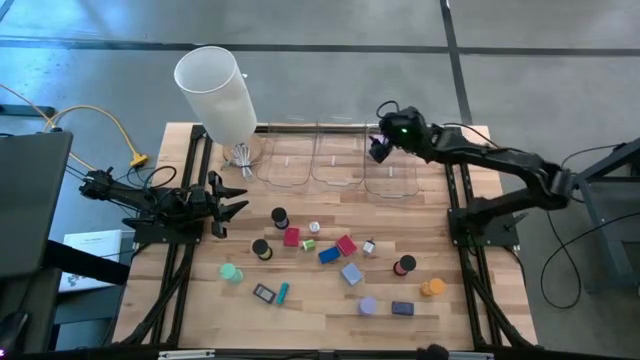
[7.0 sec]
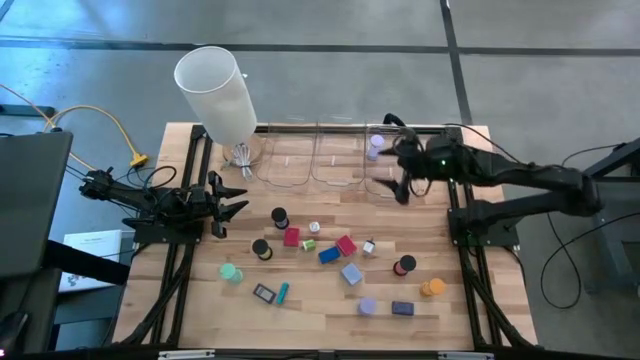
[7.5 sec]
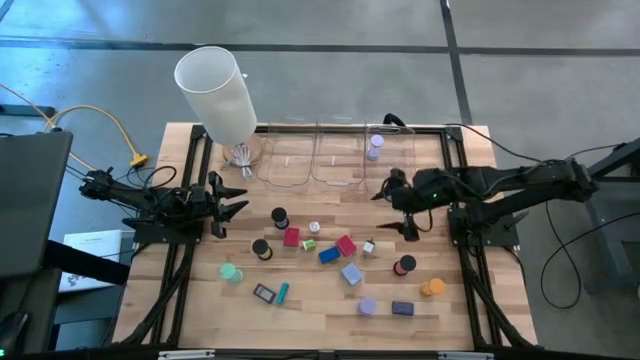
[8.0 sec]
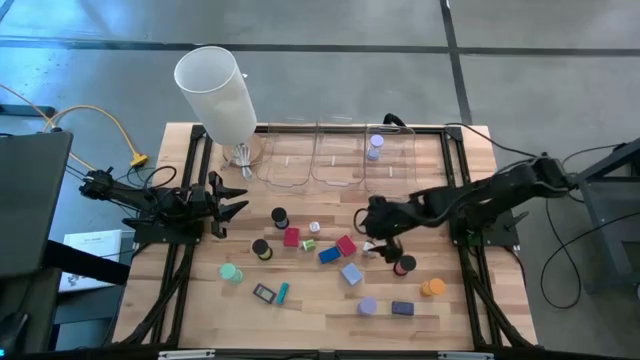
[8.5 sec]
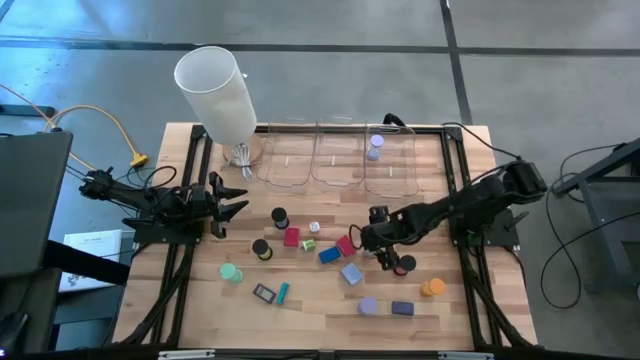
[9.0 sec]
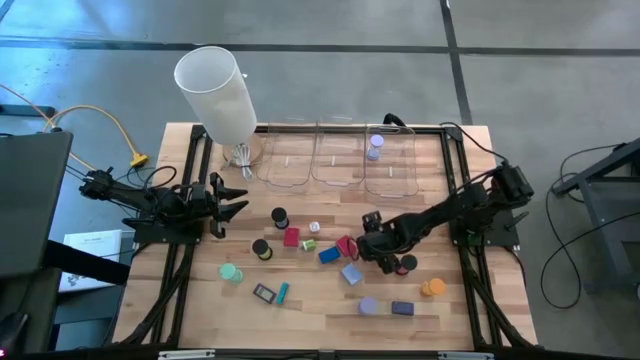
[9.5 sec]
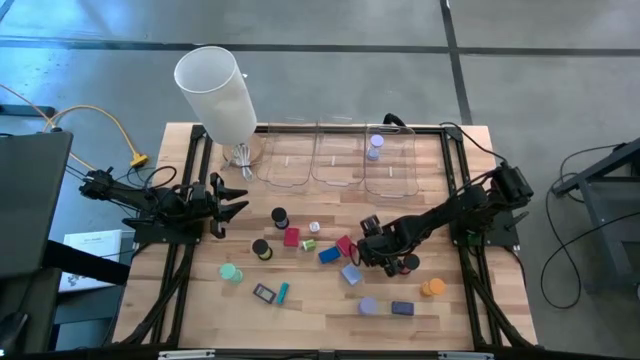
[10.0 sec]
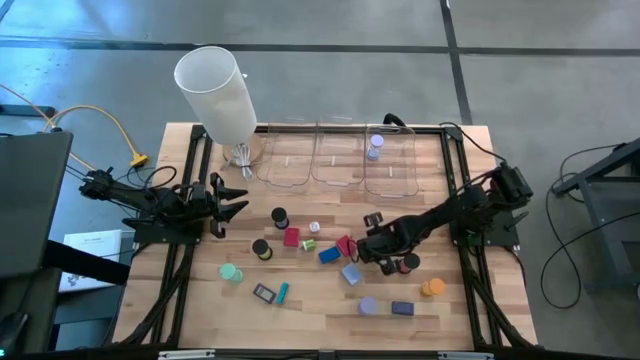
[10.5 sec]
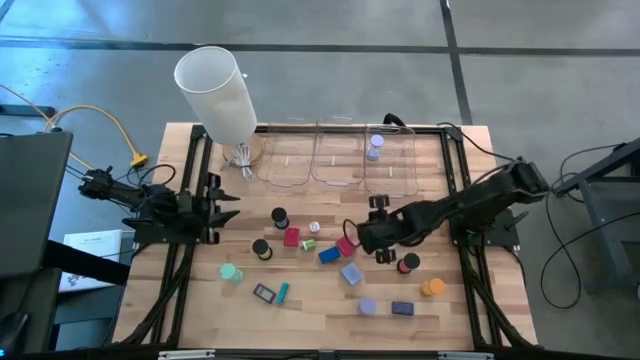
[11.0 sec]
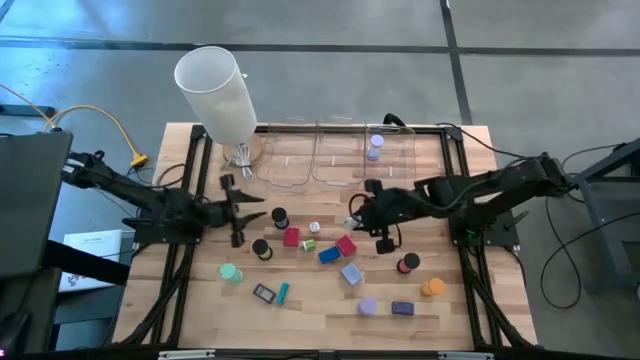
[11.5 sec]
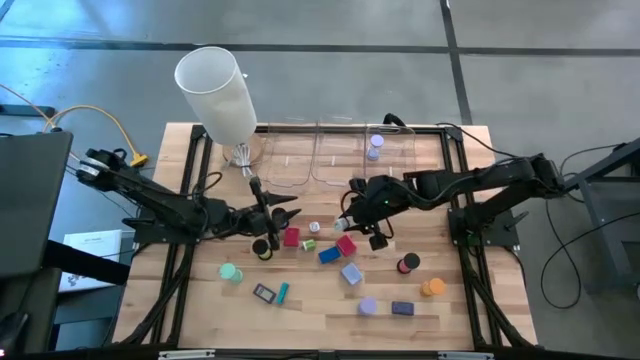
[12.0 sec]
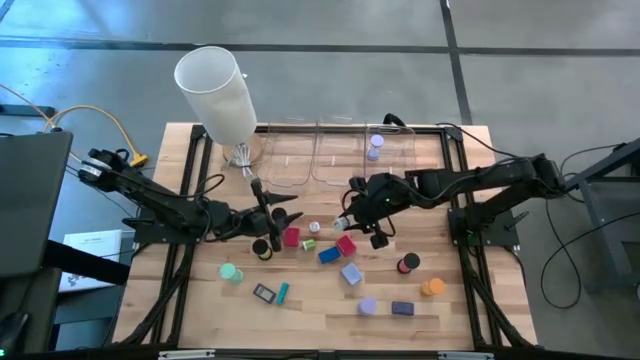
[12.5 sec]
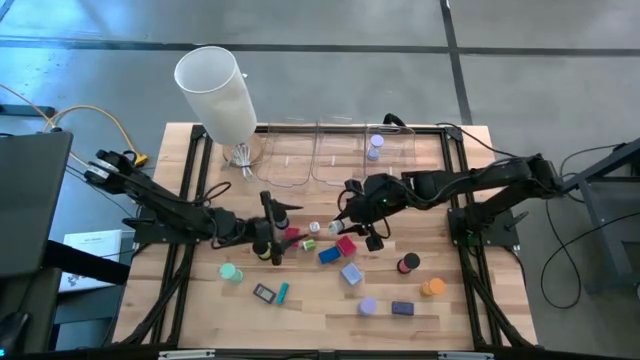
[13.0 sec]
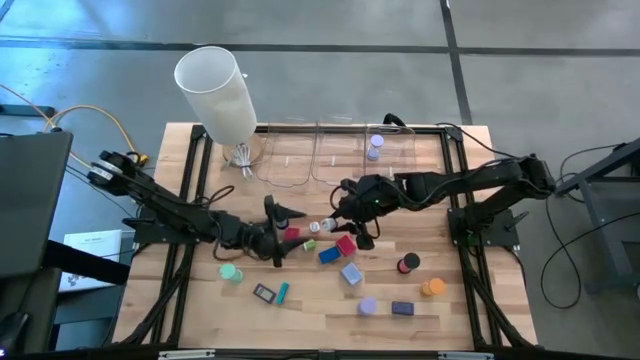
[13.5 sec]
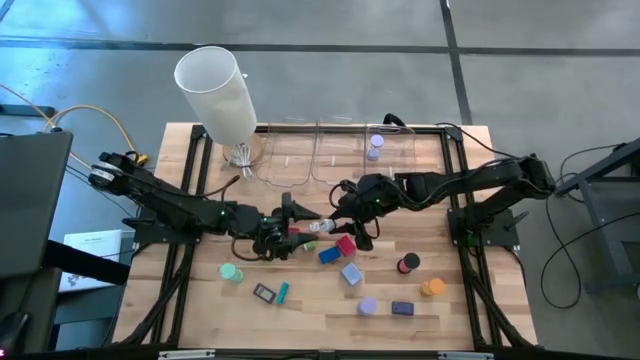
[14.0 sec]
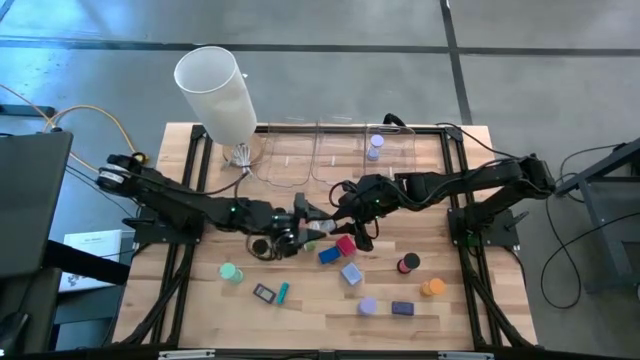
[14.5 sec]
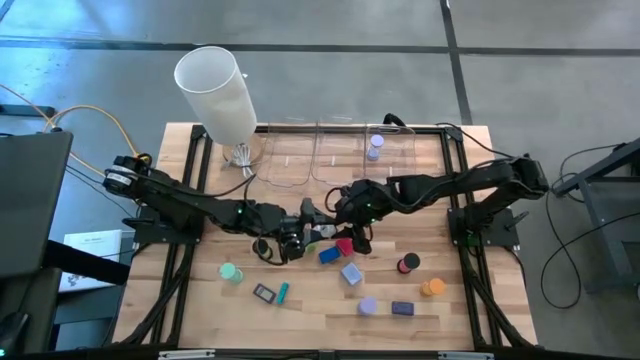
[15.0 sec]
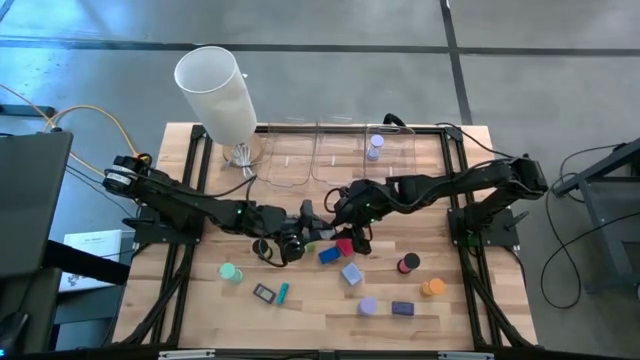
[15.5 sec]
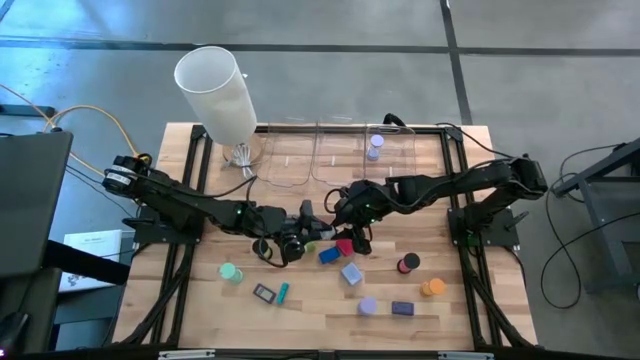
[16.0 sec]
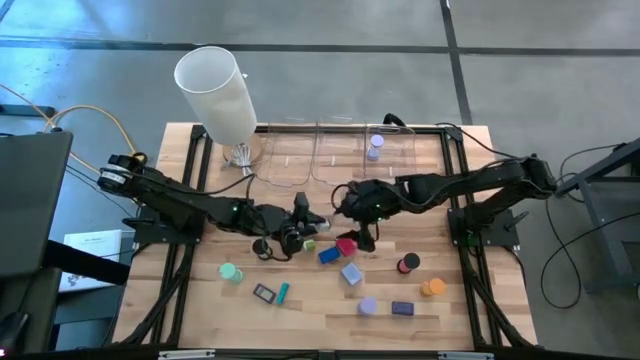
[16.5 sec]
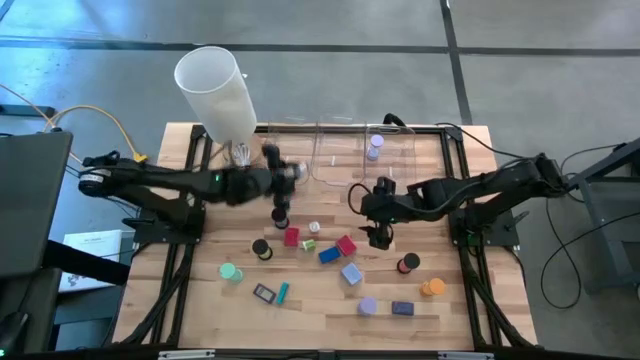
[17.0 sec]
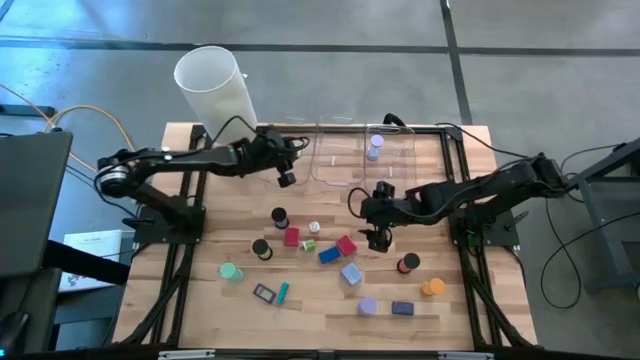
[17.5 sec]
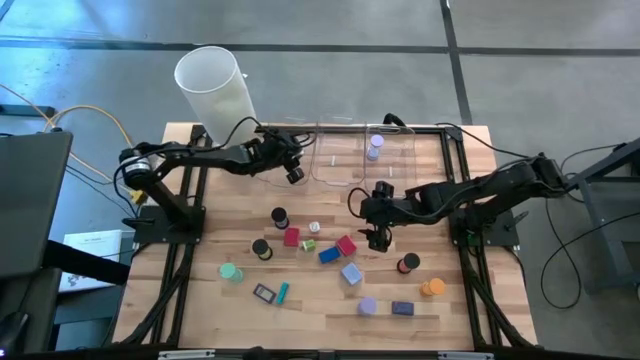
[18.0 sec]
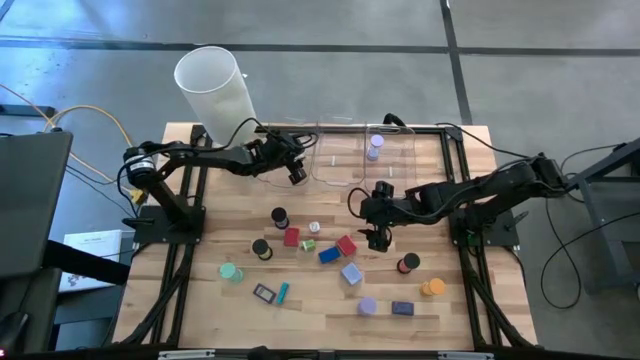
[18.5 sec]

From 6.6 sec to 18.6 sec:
Task: Pick & Place Office items
Put the white charger adapter into the left transparent bin

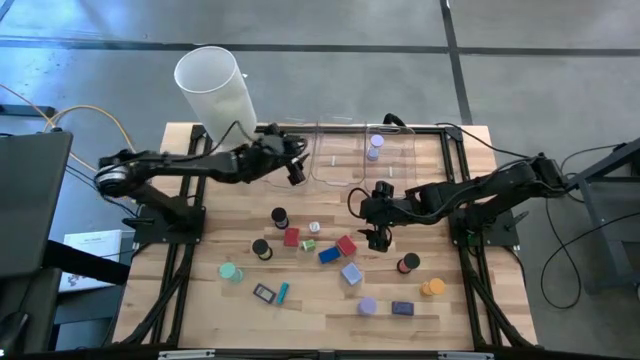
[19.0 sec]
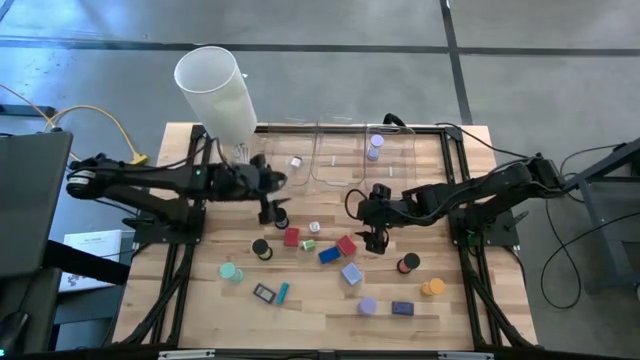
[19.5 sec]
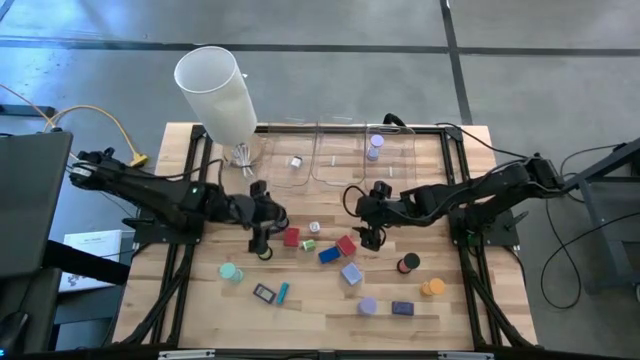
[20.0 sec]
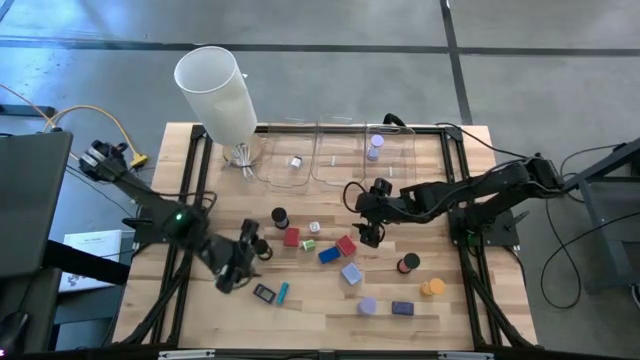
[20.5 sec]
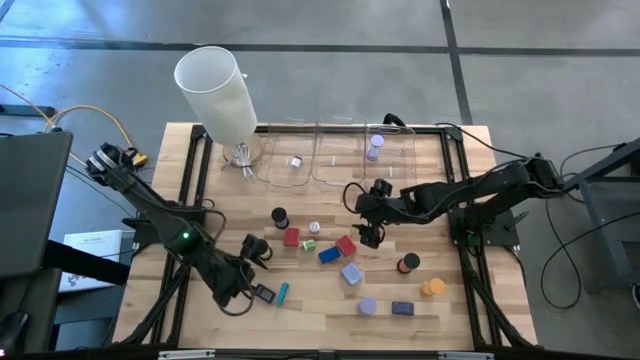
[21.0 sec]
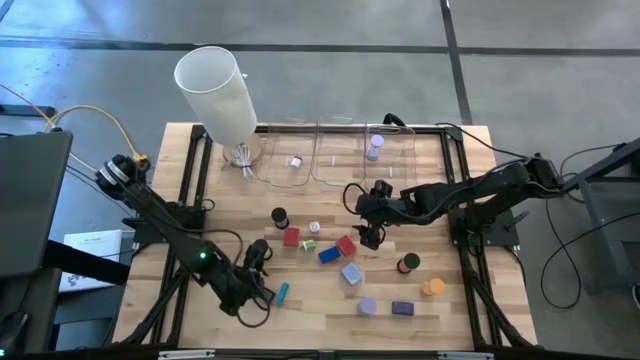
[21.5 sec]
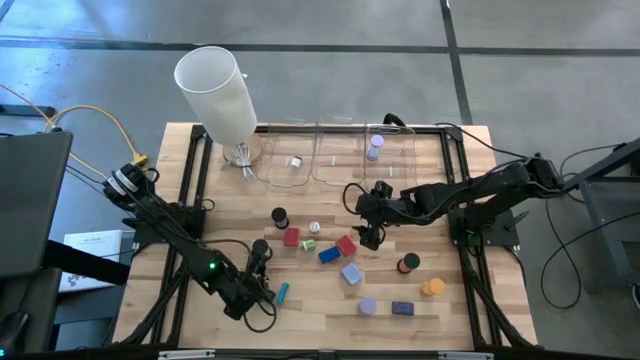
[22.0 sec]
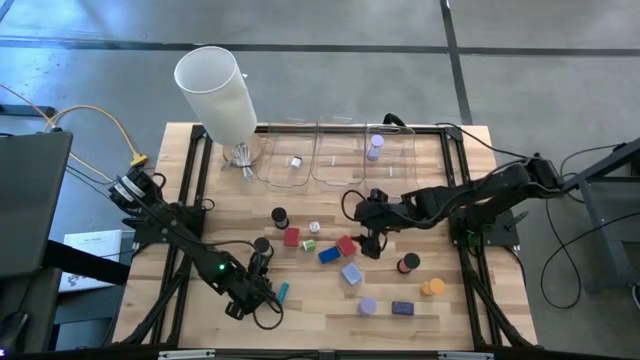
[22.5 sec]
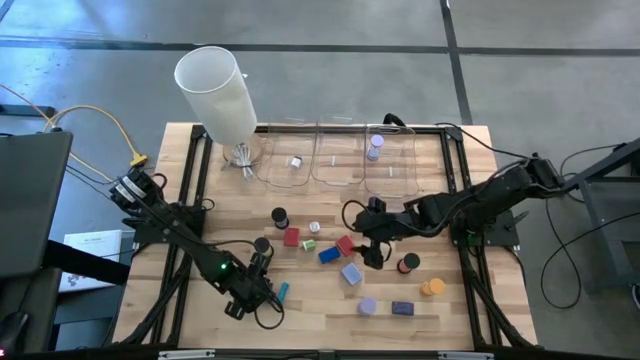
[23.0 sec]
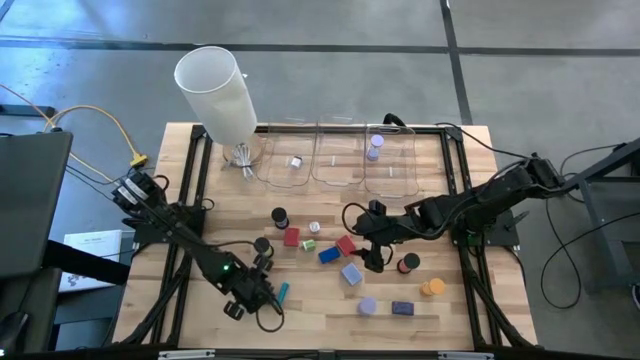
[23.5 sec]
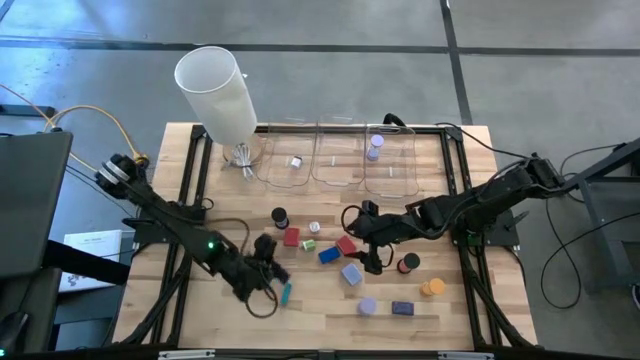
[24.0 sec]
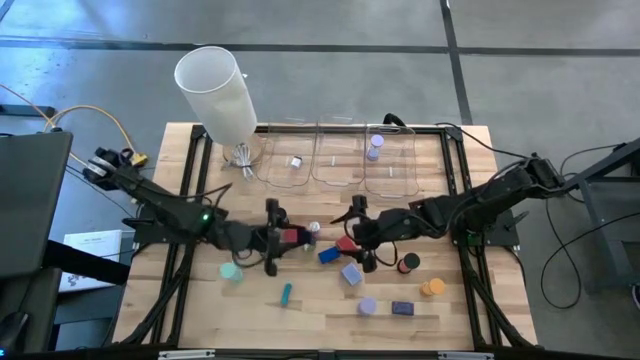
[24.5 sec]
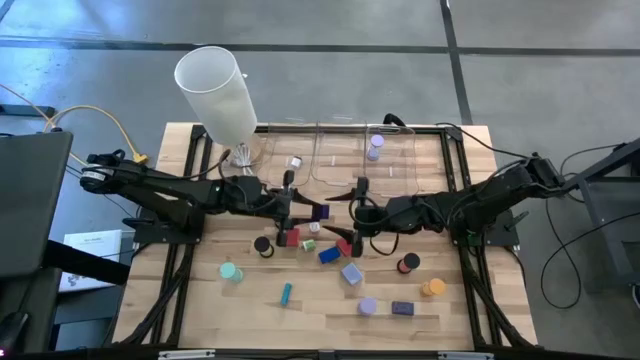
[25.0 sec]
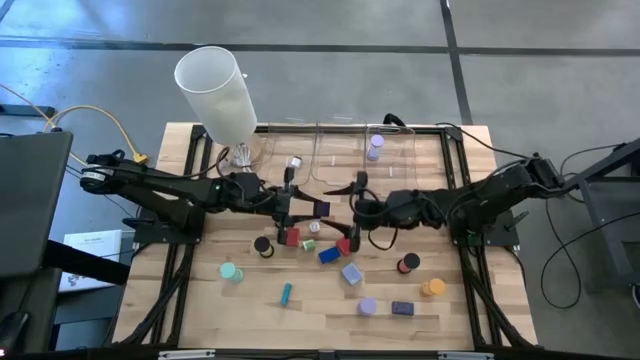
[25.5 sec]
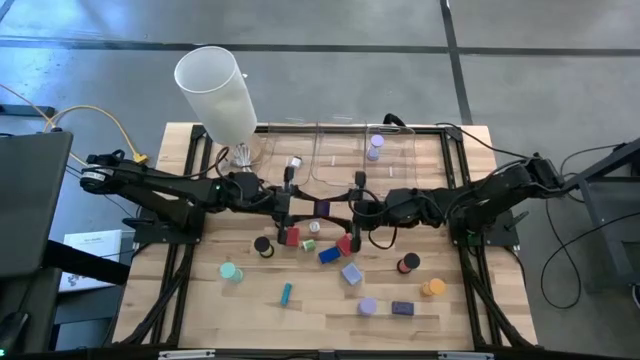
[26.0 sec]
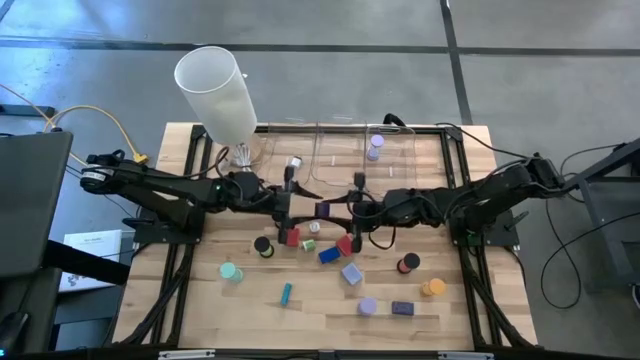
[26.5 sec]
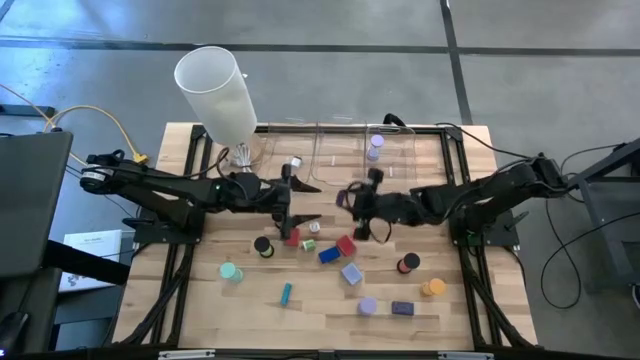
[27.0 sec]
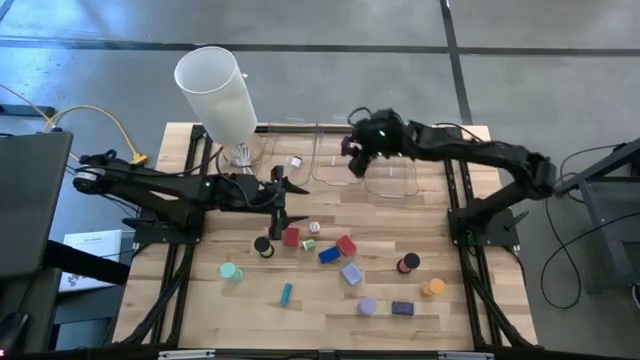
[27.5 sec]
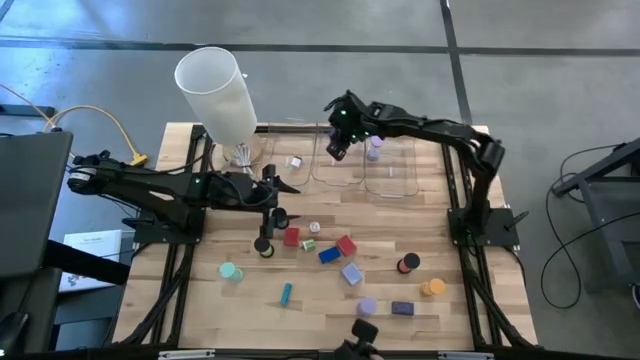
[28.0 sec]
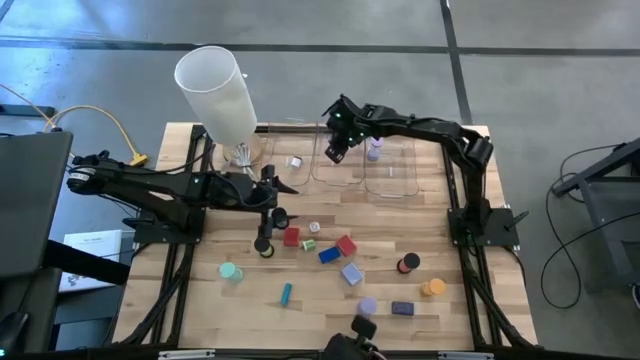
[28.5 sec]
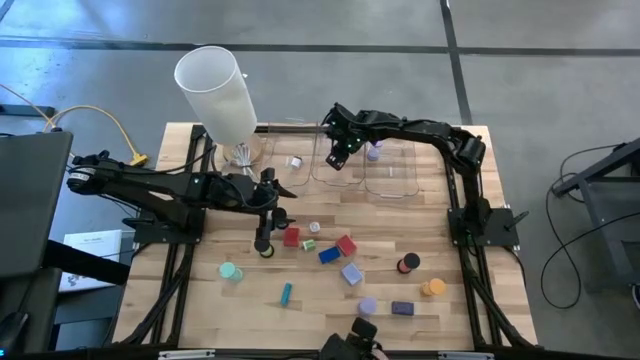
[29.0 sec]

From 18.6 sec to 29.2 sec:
Put the left dark blue digital clock into the middle transparent bin
